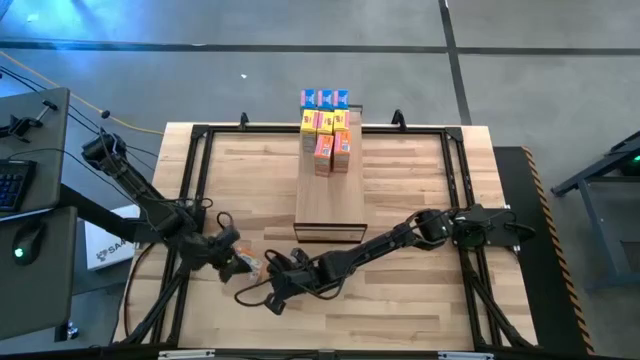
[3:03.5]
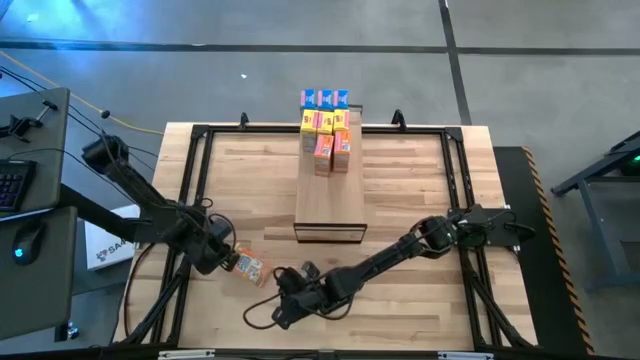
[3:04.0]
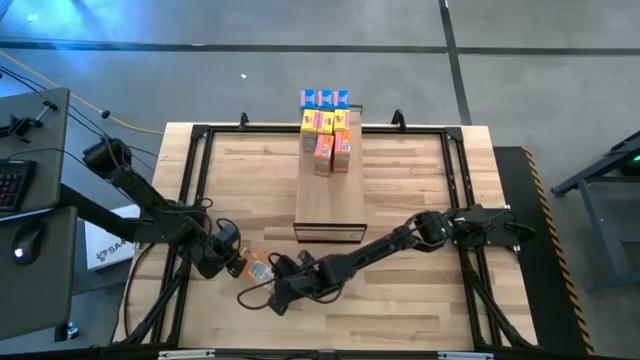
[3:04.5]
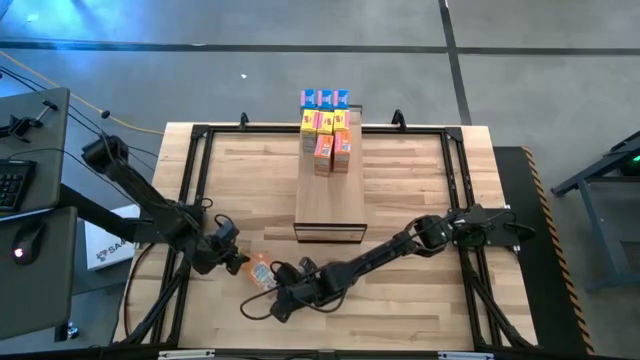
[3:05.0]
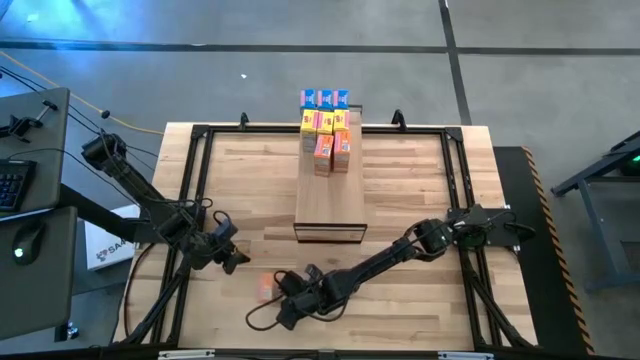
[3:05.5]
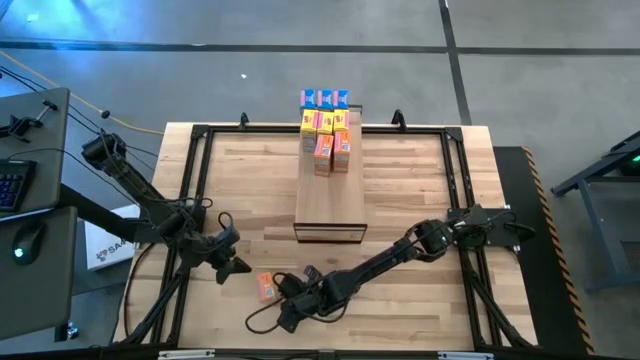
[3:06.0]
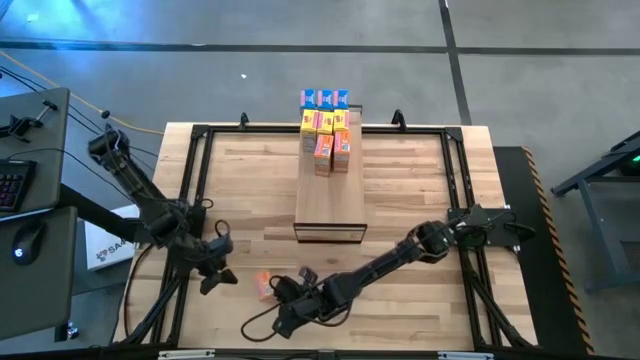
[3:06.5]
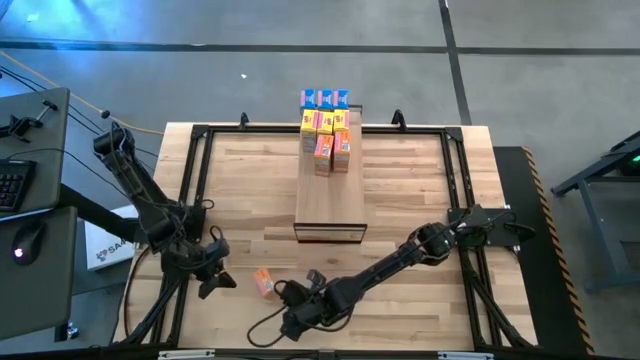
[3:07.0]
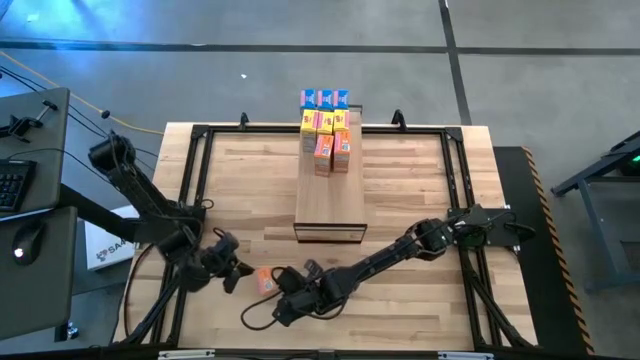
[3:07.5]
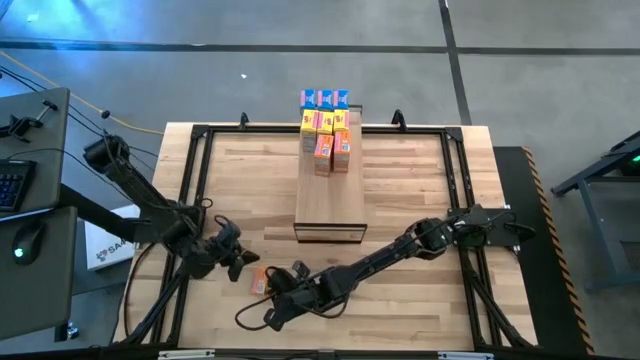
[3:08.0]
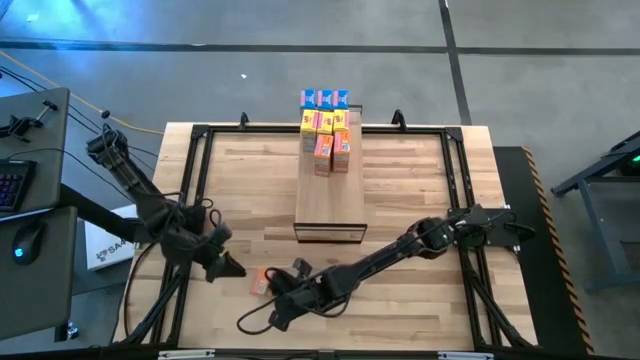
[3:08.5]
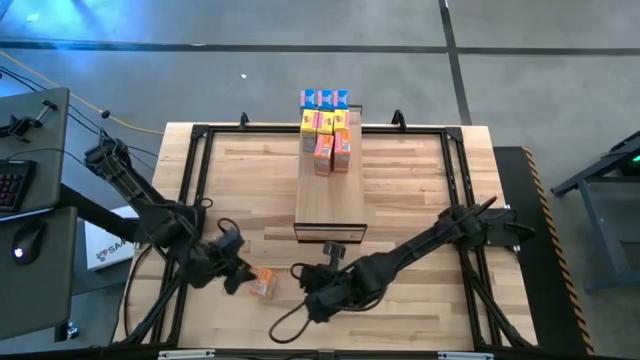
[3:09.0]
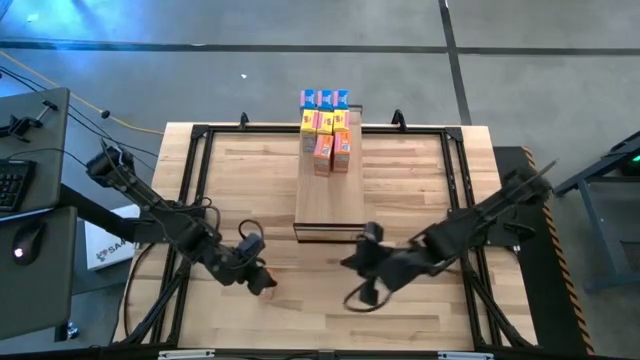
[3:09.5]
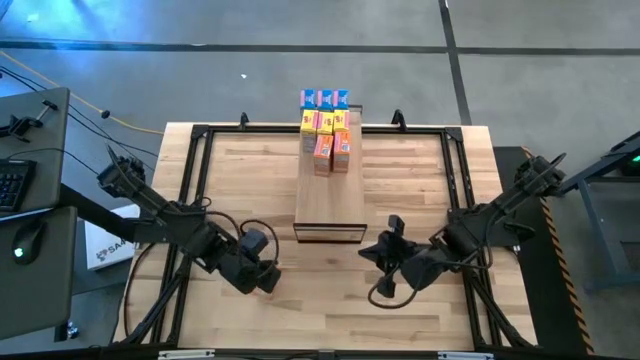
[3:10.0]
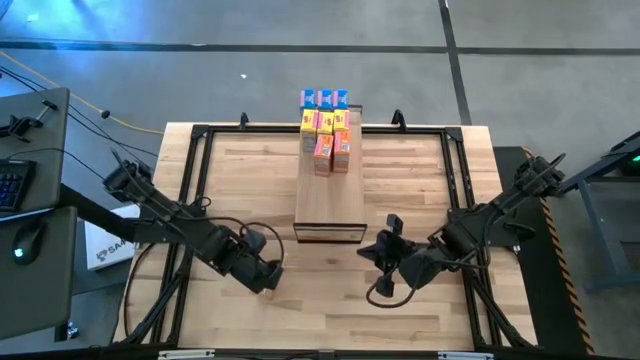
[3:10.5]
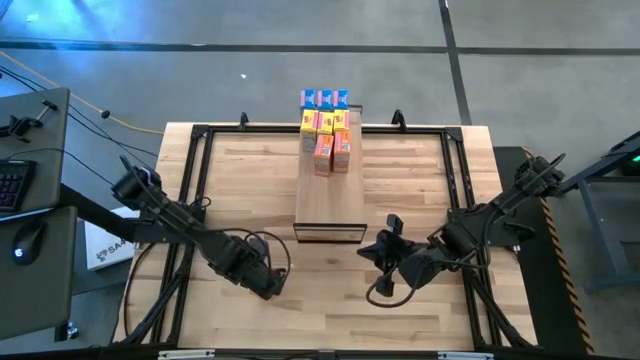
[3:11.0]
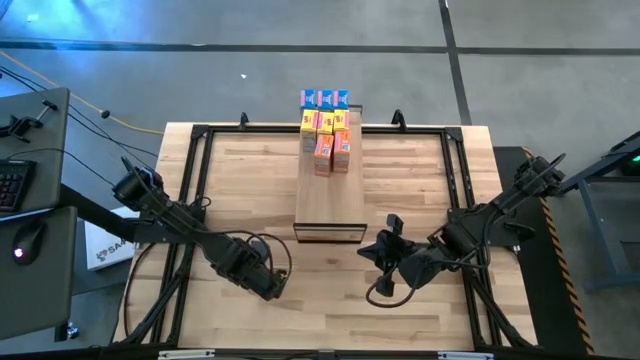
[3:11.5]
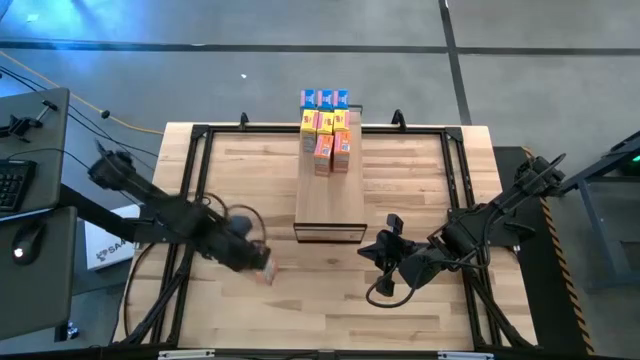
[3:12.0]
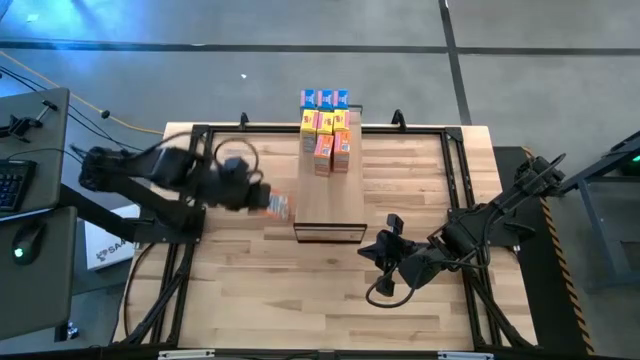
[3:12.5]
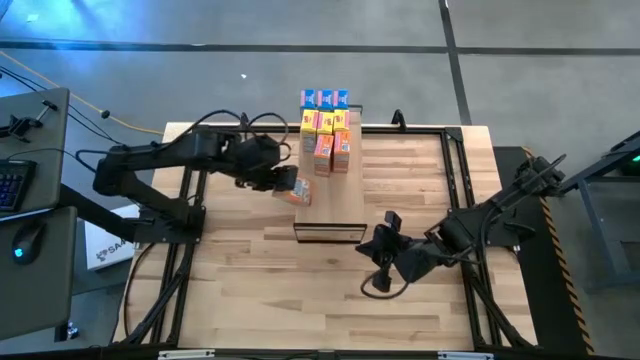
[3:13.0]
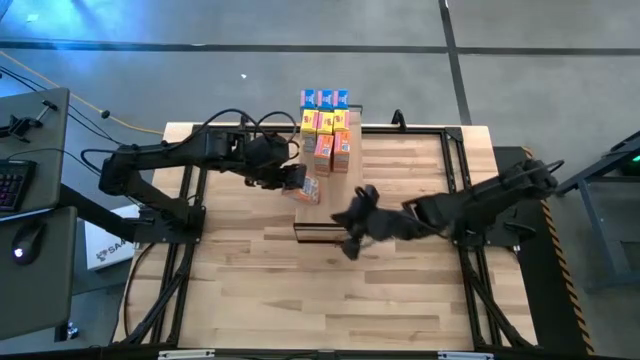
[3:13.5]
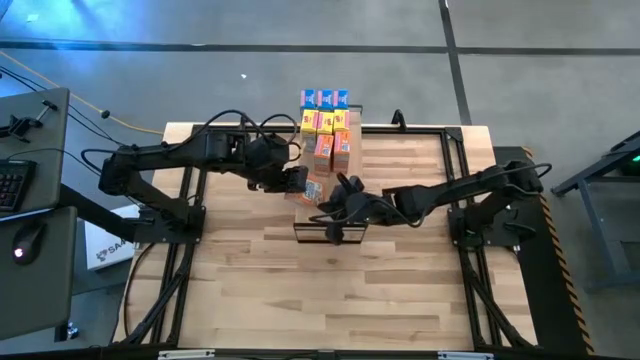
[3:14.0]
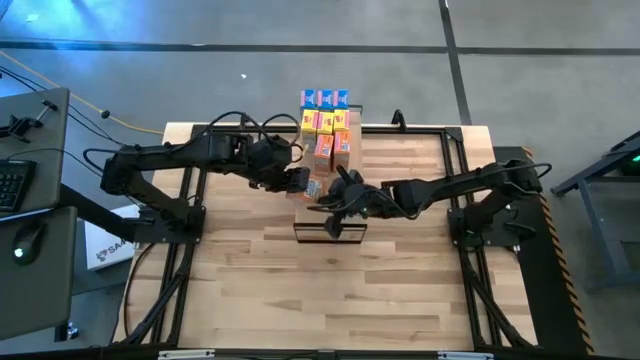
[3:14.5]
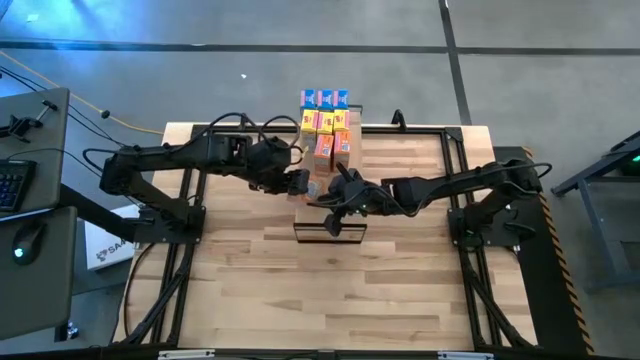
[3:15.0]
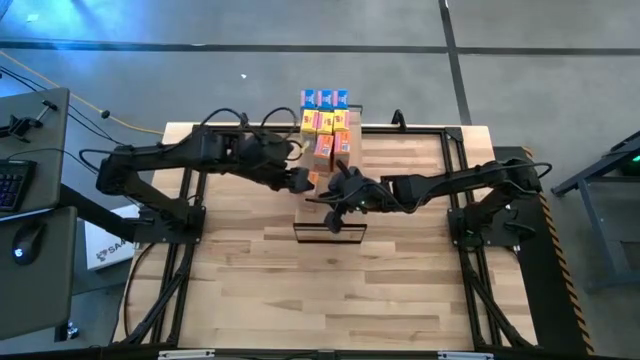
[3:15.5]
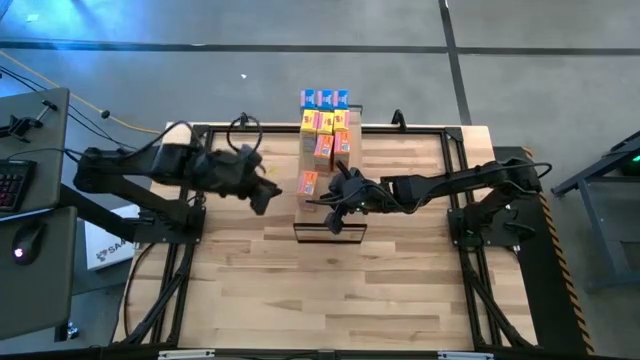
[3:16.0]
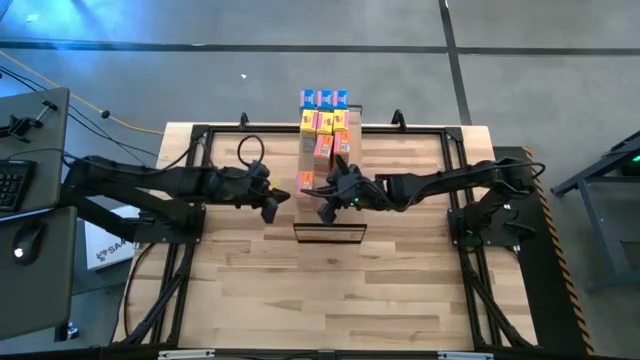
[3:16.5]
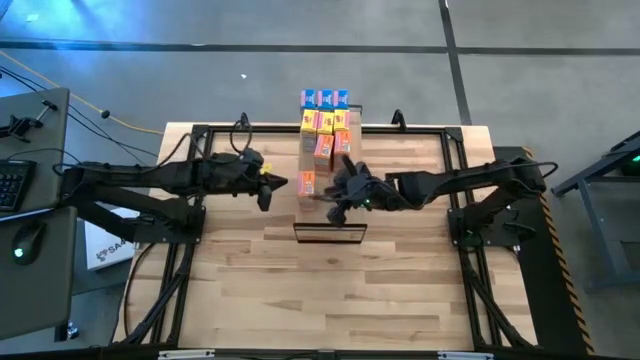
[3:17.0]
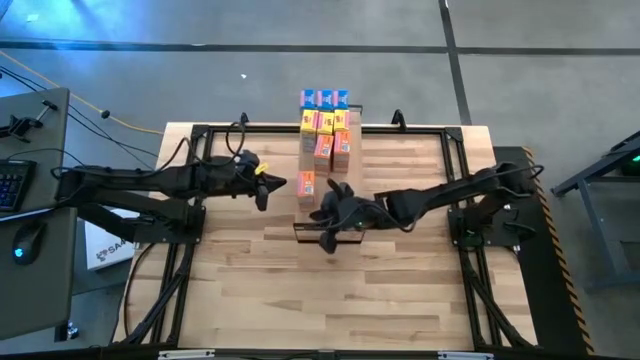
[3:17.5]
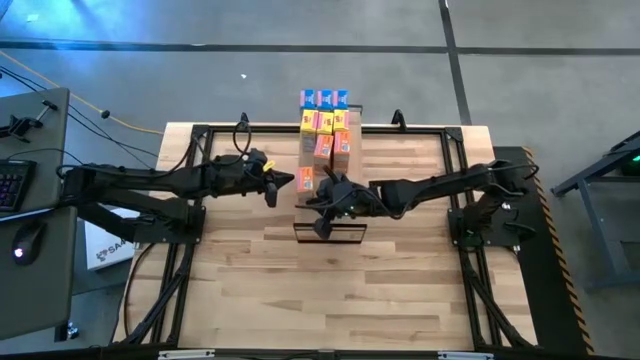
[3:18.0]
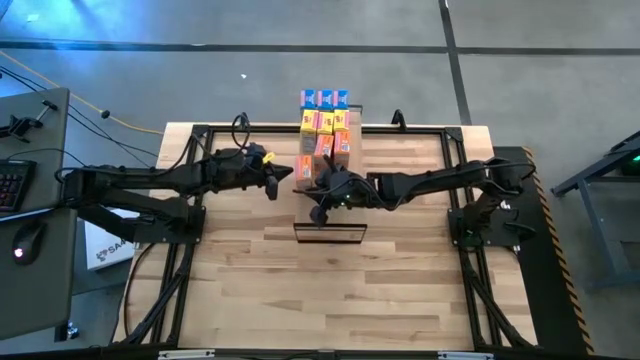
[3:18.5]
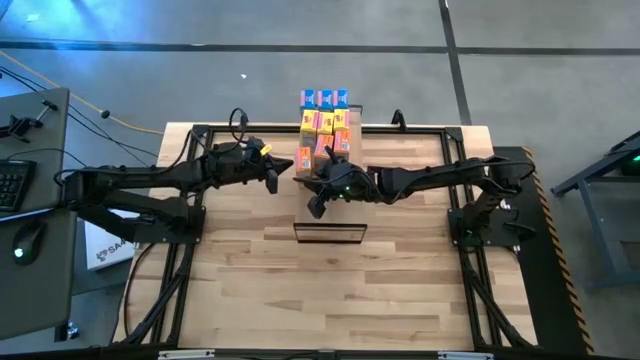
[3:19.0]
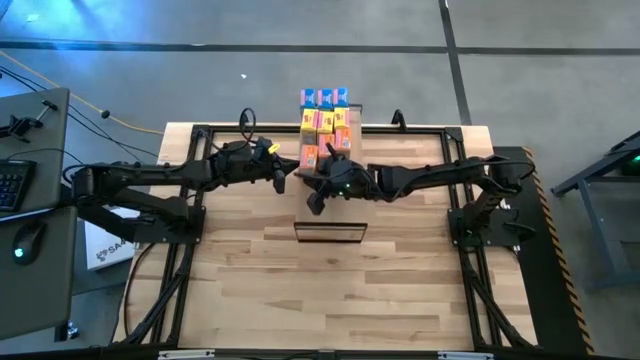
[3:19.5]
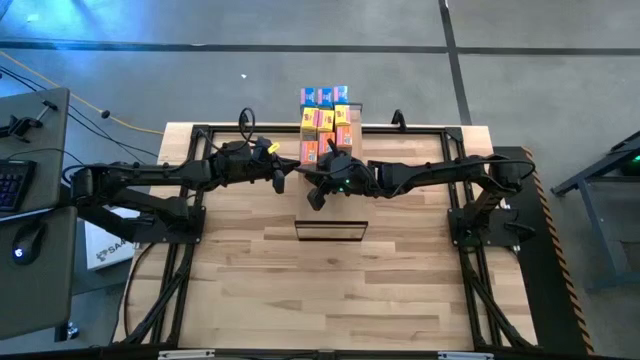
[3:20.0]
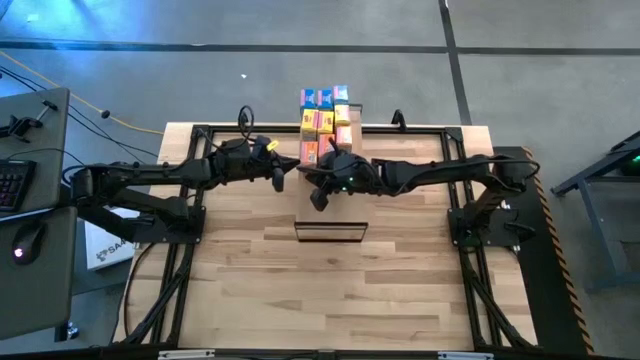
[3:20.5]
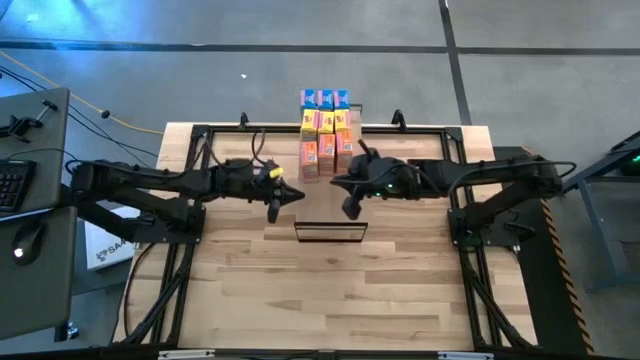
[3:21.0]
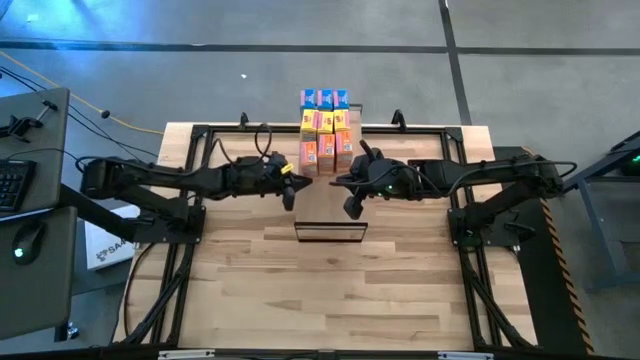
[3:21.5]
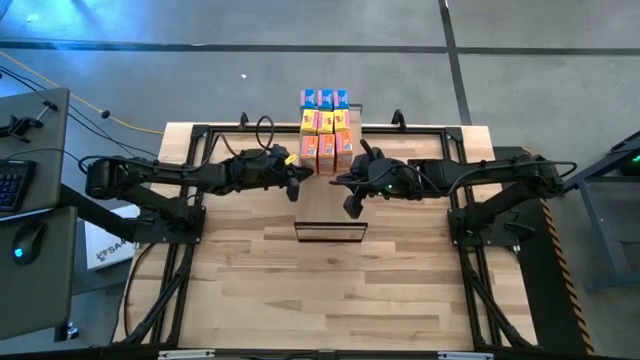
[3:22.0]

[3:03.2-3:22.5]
Task: Stack cereal on shelf
Put the orange cereal box on the shelf aligned with the orange cereal boxes

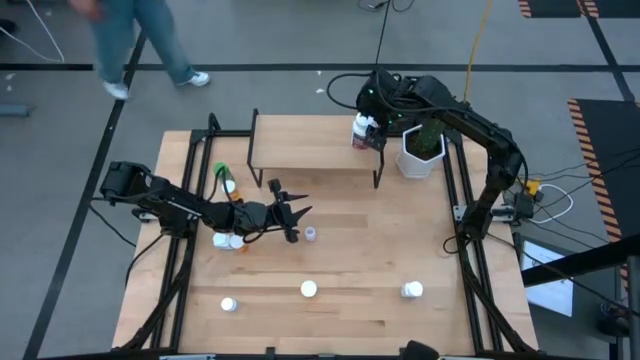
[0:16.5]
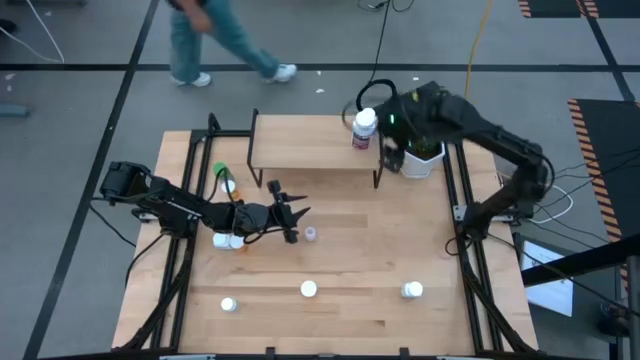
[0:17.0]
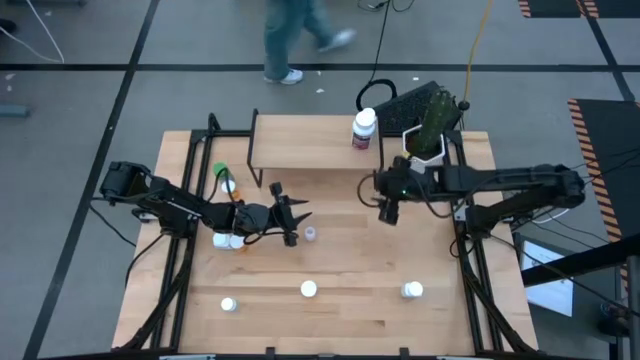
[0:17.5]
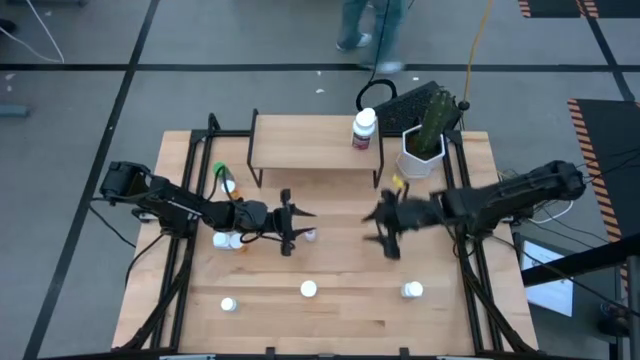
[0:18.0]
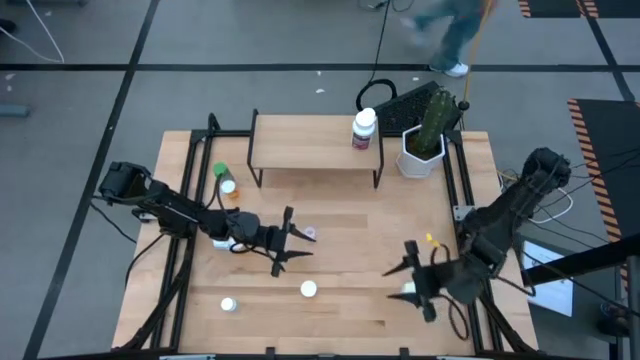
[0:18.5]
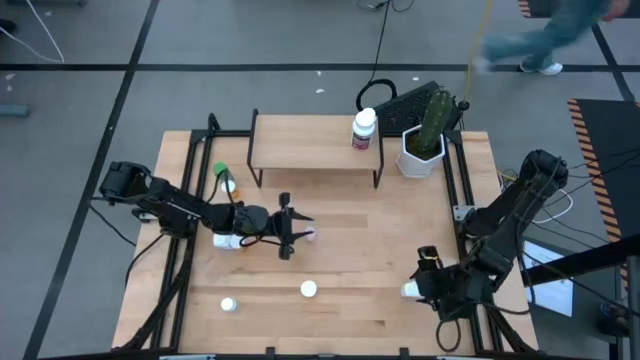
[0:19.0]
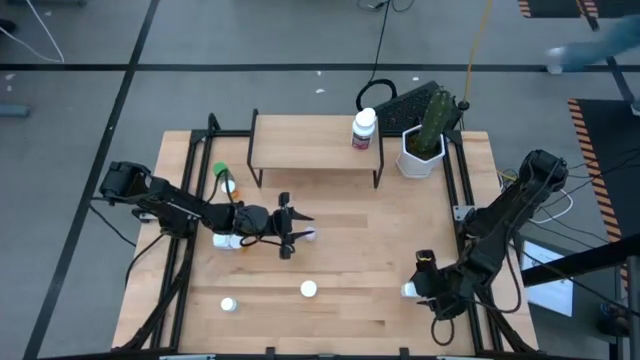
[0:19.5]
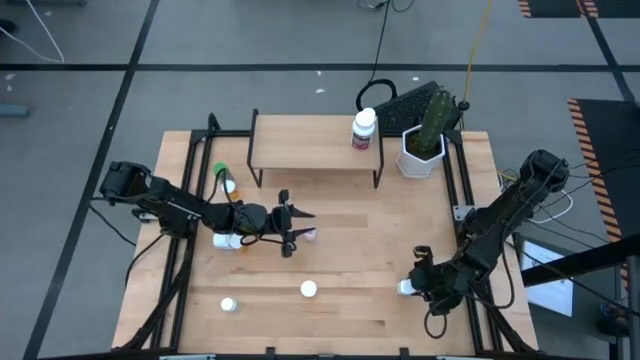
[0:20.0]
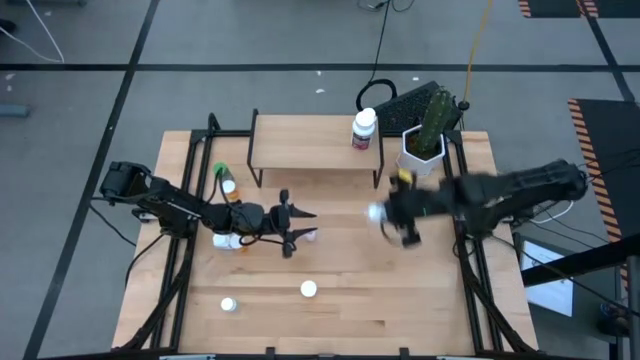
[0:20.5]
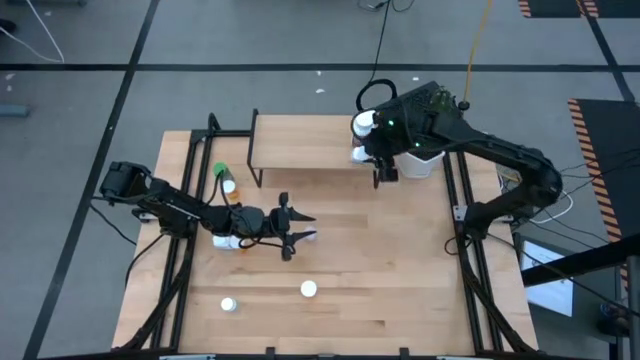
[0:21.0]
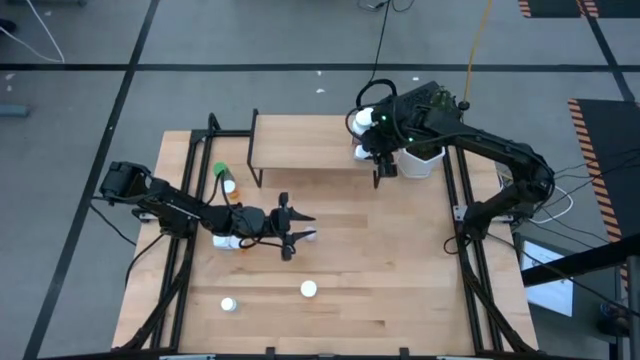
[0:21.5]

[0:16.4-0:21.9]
Task: Pick and place medicine bottles onto shelf by color
Put the bottom white and blue medicine bottle on the shelf
